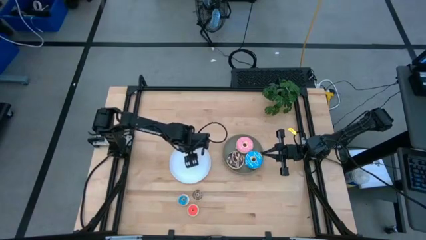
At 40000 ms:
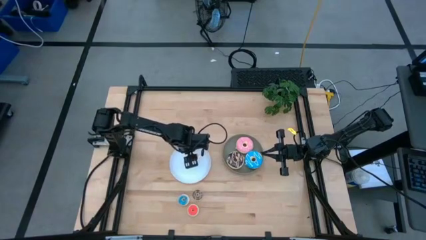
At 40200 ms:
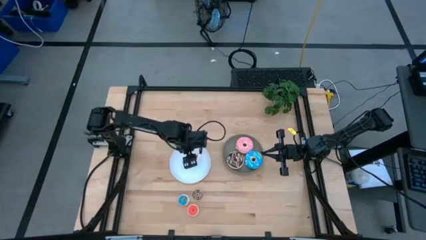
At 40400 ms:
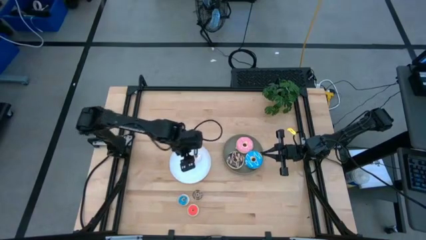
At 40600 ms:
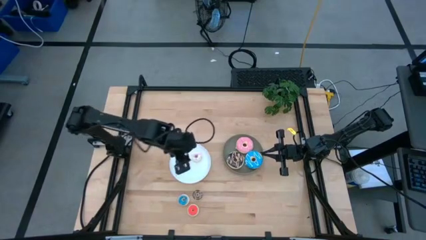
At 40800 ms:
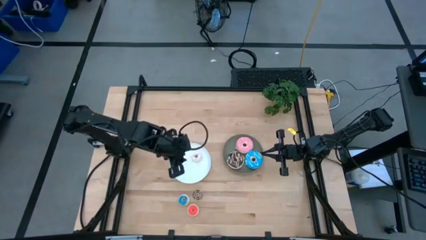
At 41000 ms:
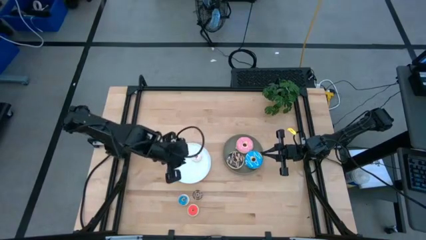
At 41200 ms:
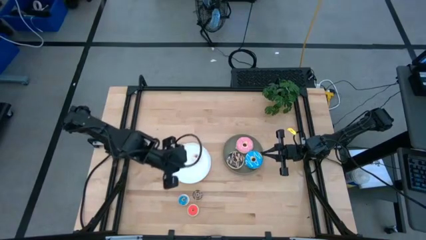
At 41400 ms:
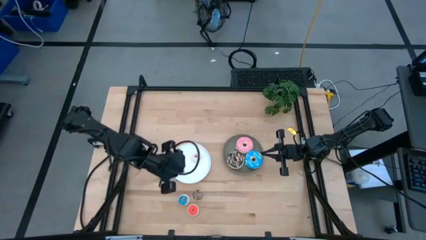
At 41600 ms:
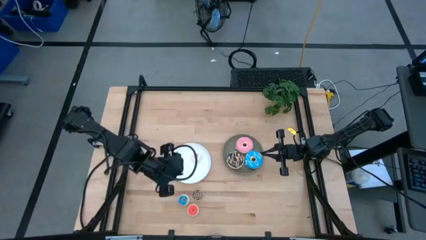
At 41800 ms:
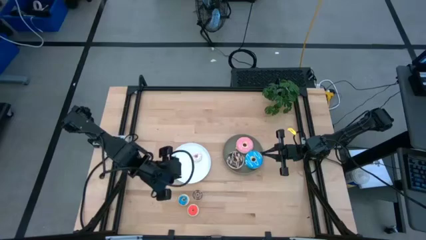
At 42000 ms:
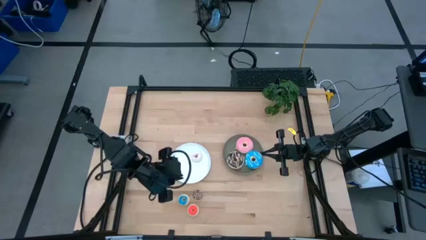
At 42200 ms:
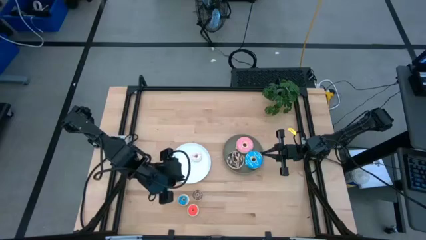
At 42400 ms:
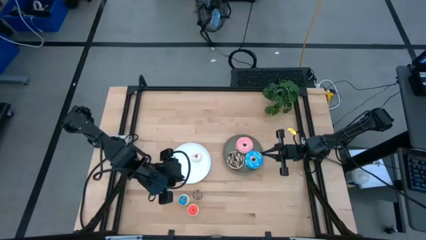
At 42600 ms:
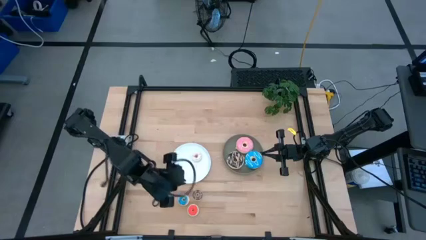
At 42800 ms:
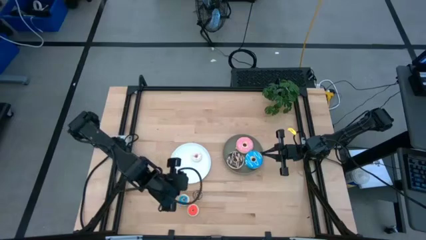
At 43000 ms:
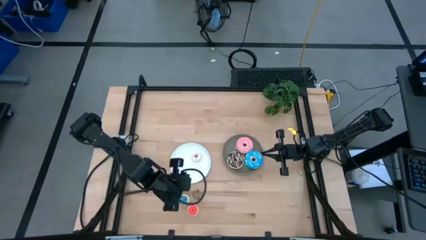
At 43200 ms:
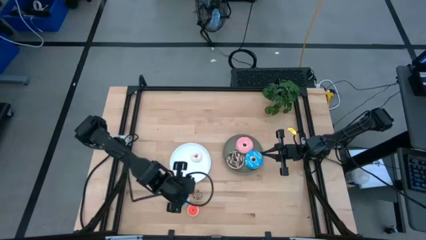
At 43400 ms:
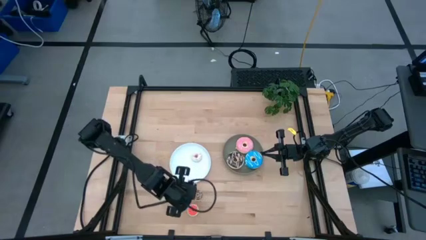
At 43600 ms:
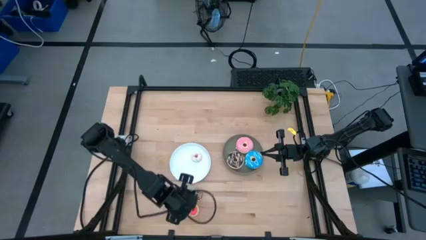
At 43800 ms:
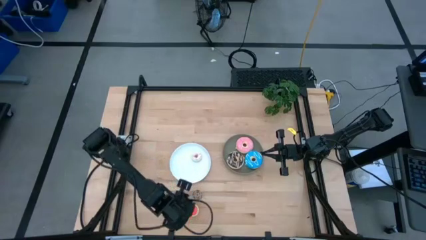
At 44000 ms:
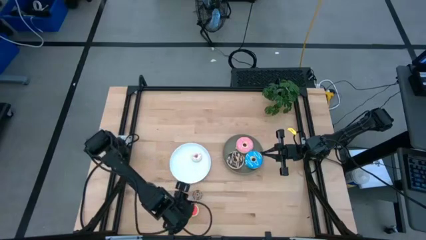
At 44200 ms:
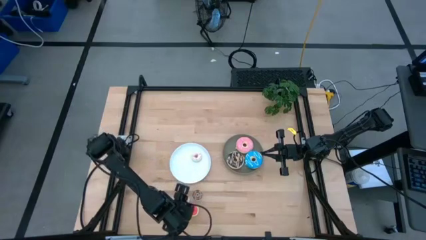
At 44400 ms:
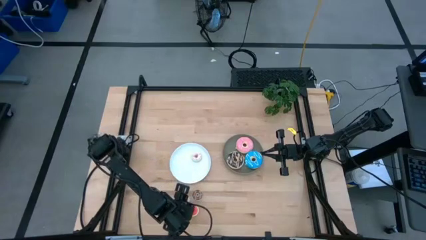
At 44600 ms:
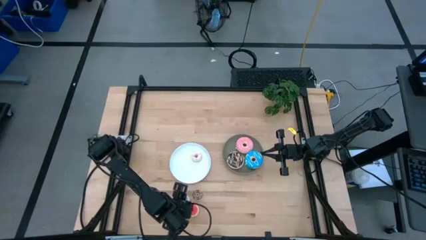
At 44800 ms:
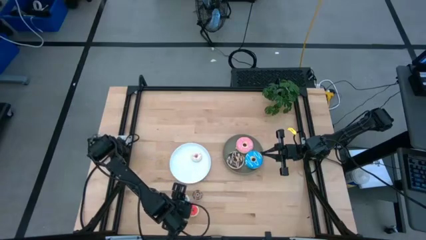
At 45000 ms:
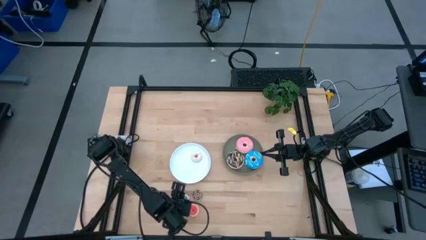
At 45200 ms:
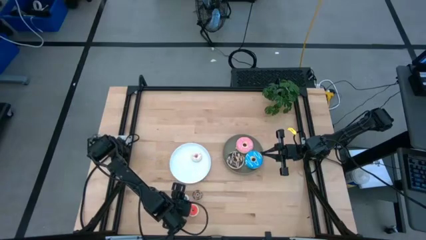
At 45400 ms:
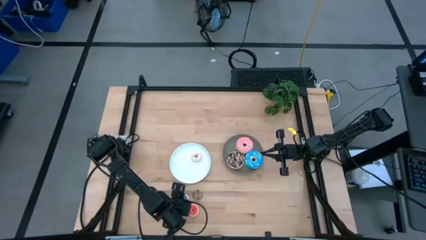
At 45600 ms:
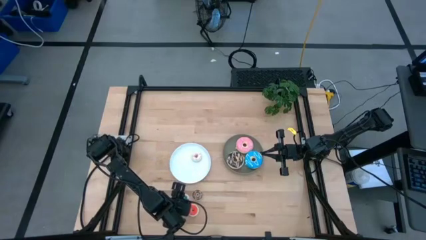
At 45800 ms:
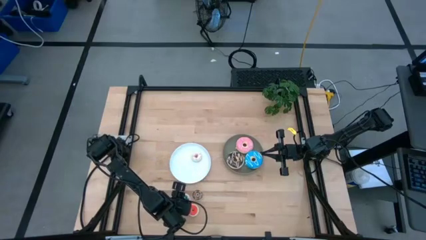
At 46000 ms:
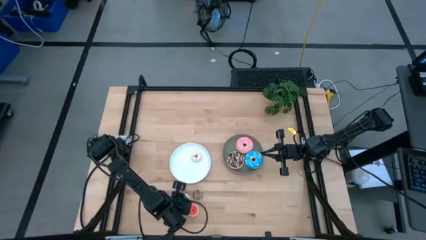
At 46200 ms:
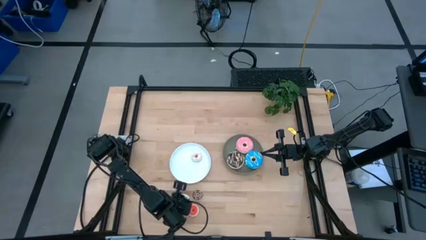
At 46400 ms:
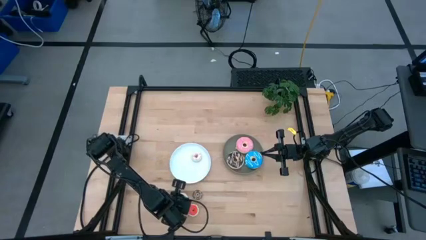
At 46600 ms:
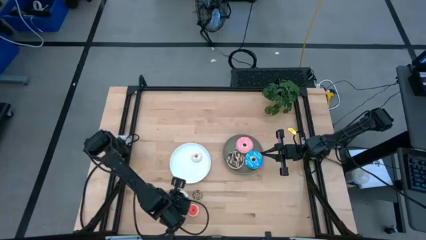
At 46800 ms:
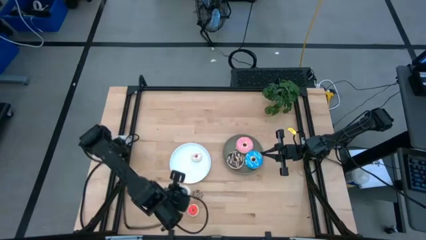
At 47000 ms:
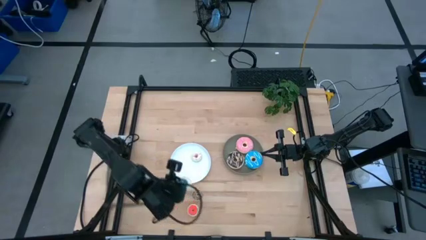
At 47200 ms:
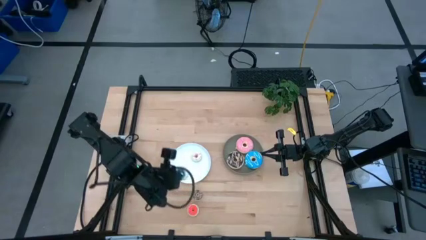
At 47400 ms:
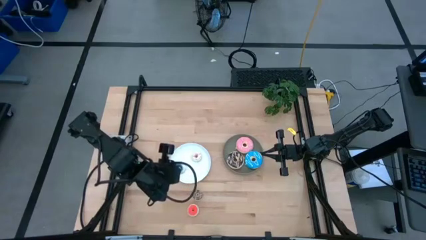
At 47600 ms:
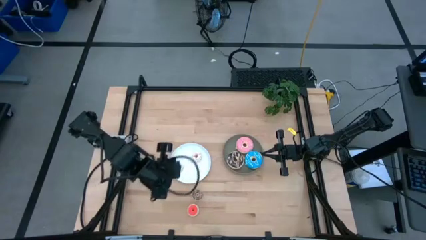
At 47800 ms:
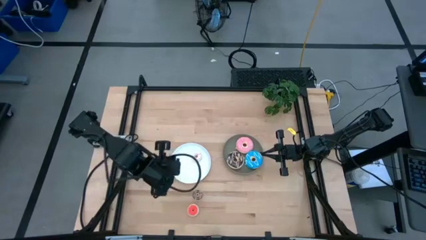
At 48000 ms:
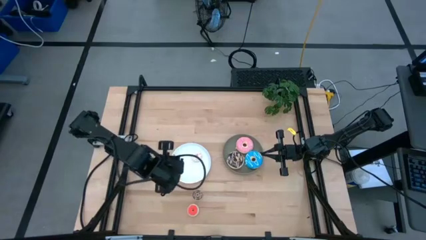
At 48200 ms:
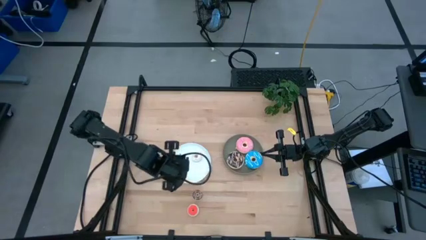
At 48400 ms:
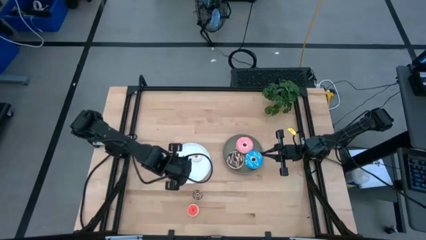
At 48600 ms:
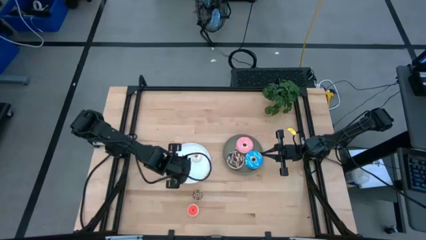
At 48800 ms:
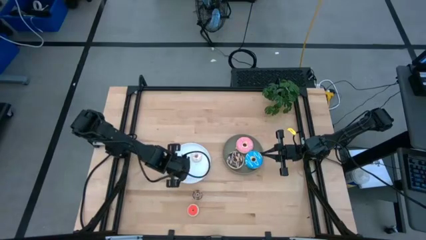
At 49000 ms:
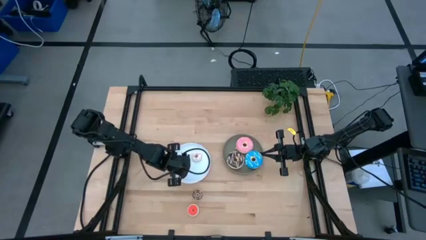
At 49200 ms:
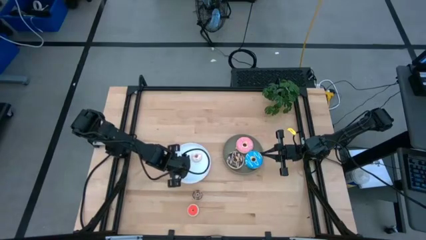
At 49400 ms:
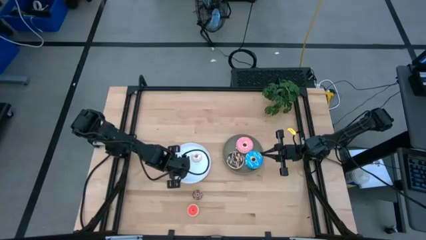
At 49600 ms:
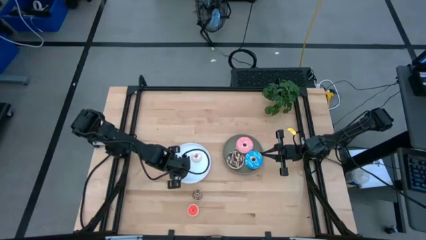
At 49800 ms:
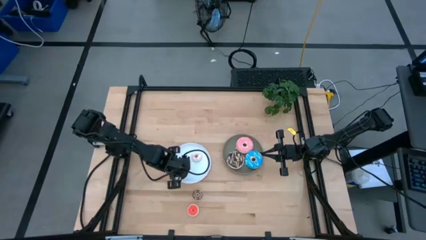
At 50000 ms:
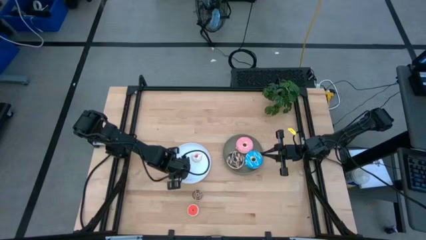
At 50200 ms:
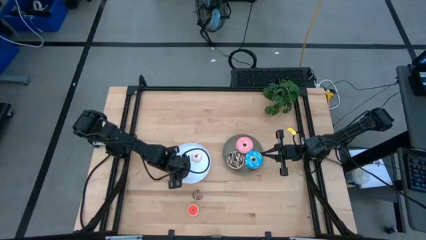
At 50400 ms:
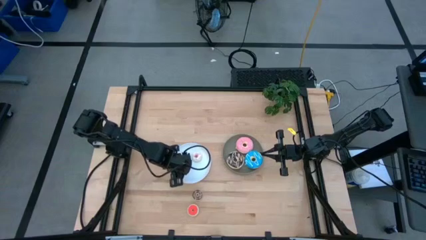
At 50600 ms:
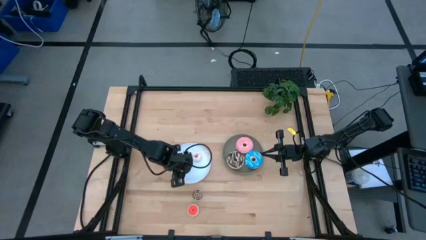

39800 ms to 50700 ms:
Task: Pick & Place donuts
Put the small blue donut on the white plate

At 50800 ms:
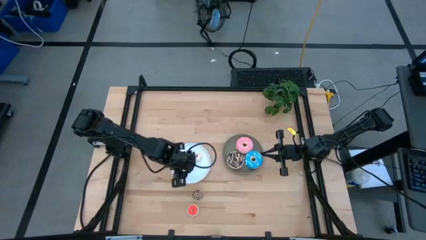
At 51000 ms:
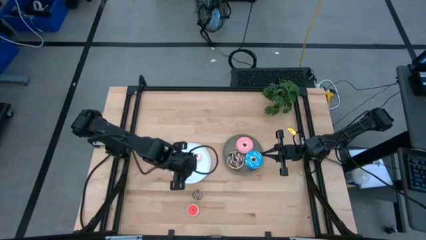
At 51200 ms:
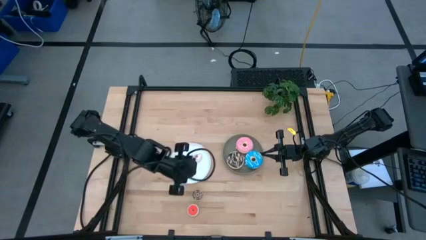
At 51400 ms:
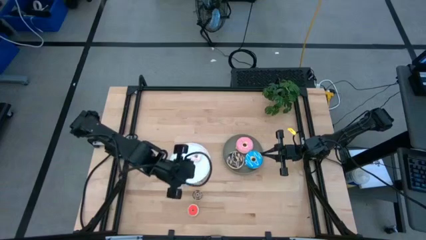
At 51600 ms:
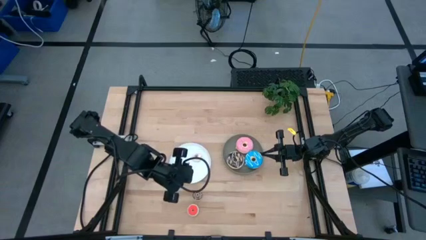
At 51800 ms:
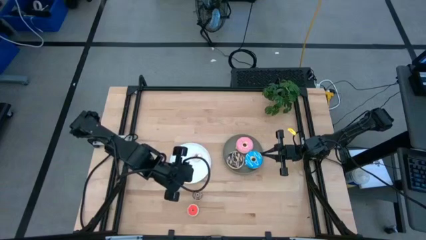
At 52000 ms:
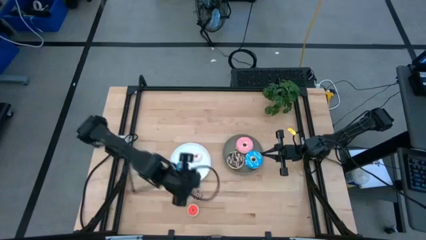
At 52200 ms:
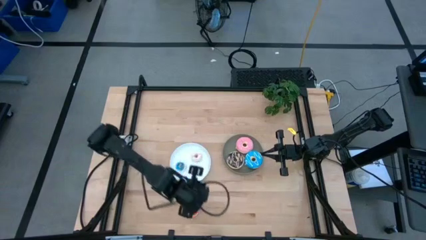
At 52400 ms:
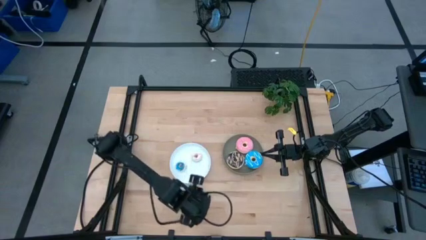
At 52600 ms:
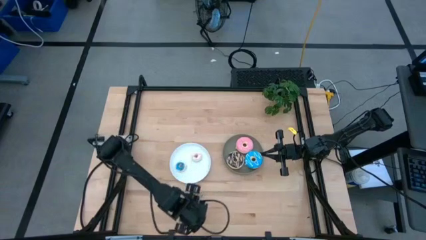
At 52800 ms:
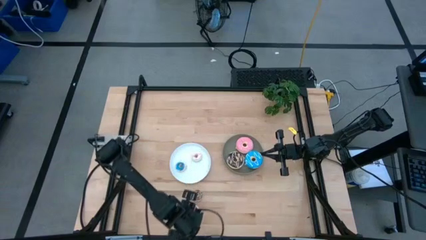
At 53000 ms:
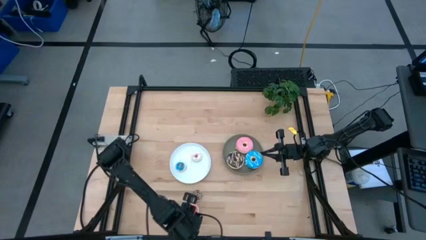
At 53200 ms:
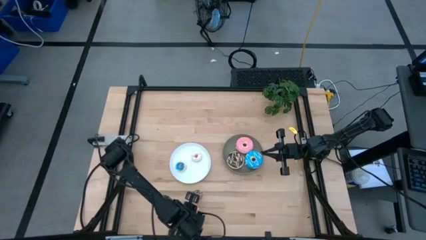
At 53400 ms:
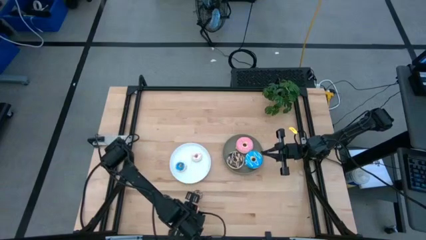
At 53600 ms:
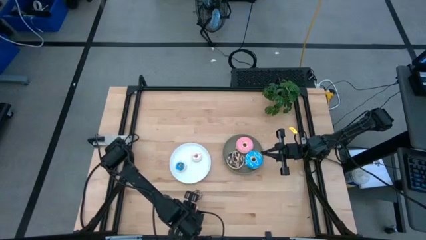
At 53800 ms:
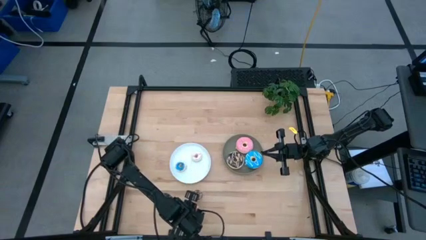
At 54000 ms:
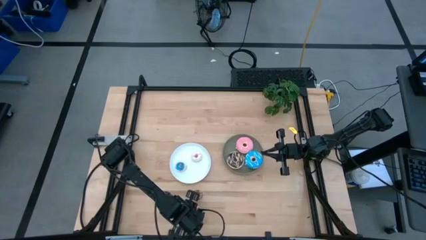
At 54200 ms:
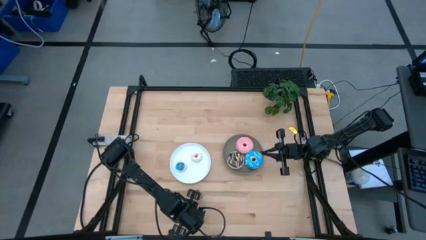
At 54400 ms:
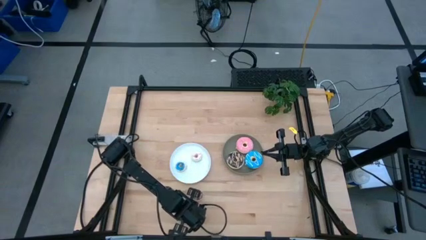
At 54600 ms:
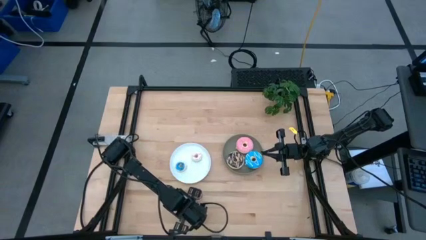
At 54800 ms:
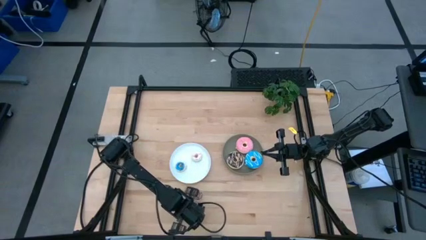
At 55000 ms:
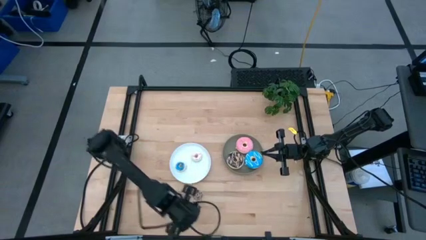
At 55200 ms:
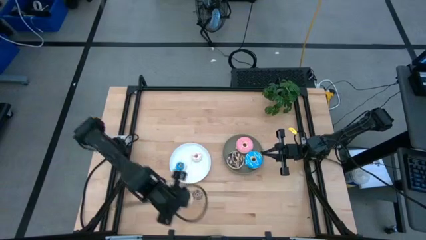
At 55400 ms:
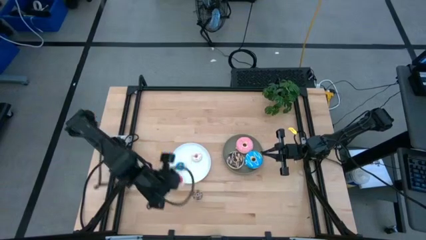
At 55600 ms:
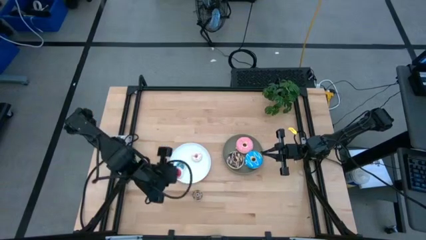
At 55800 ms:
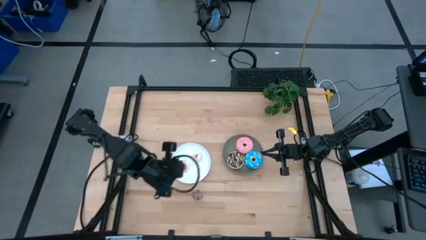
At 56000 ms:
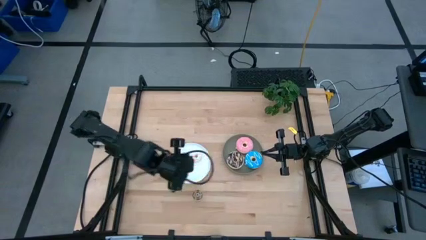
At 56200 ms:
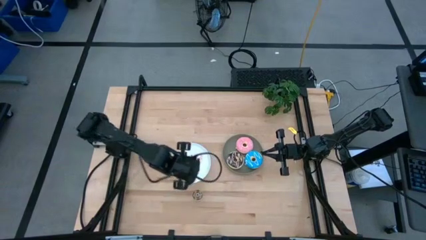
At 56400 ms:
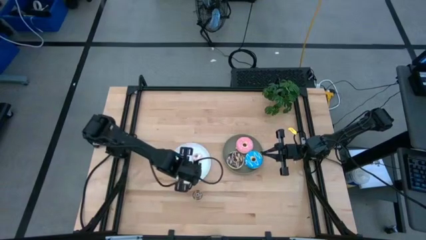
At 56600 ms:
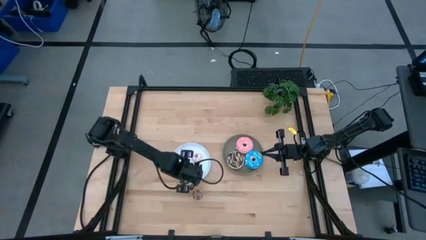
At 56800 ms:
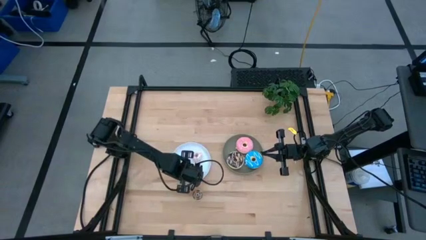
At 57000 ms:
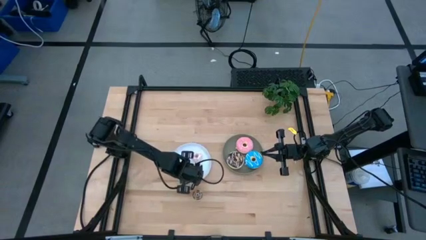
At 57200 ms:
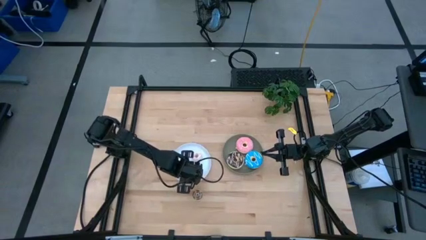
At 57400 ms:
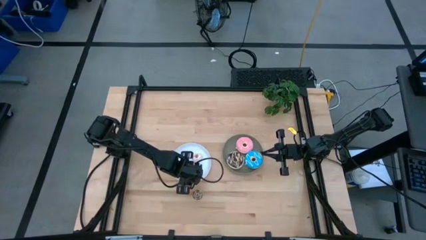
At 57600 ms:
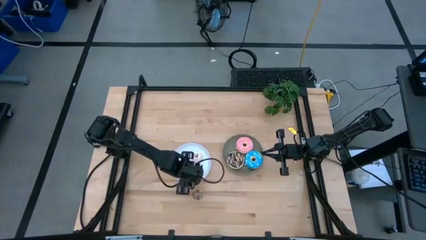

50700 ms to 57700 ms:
Put the small orange donut on the white plate
